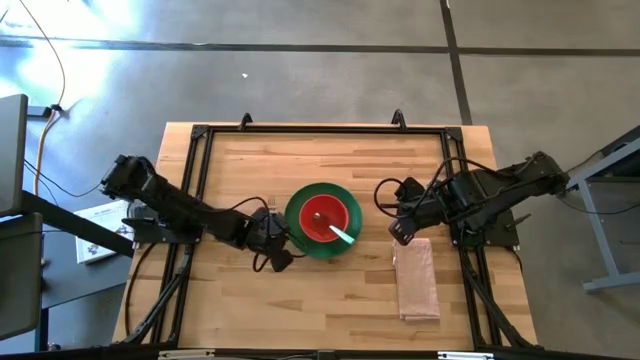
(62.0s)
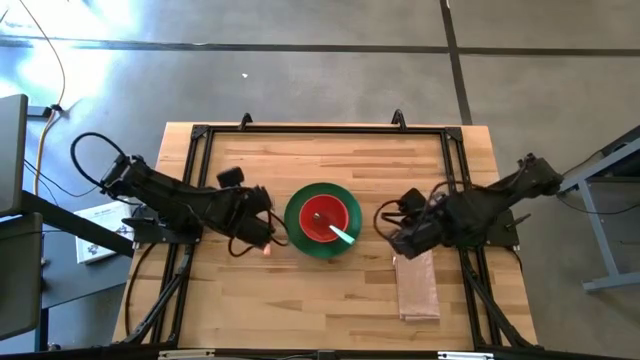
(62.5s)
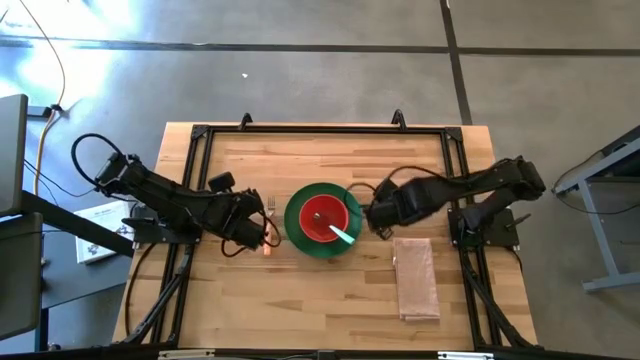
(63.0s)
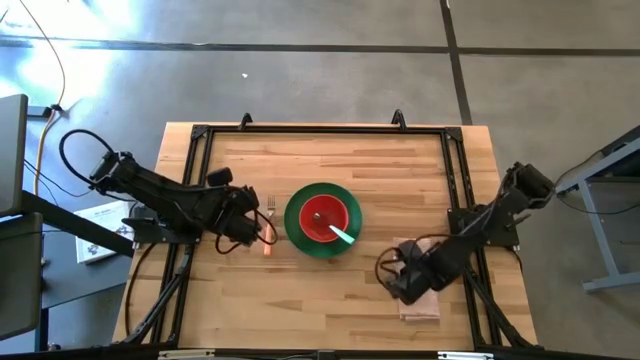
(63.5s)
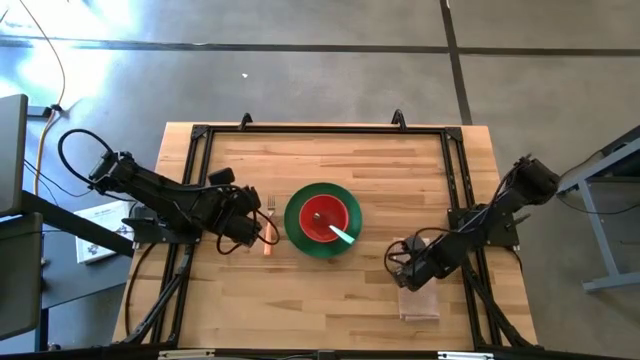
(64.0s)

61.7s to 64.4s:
Task: Set table place
Adjust the light orange table napkin

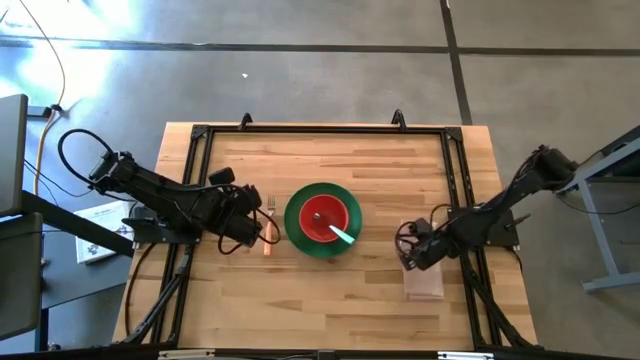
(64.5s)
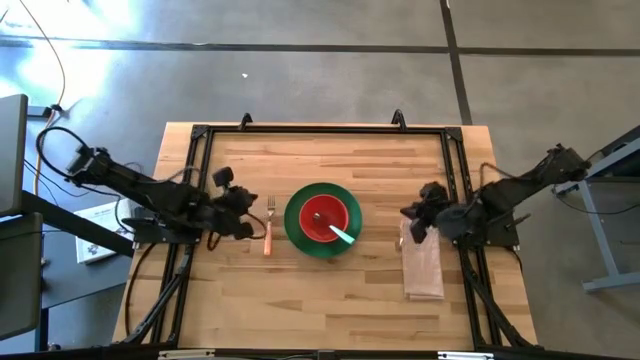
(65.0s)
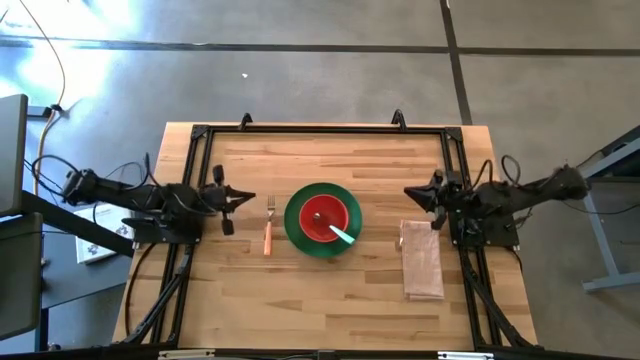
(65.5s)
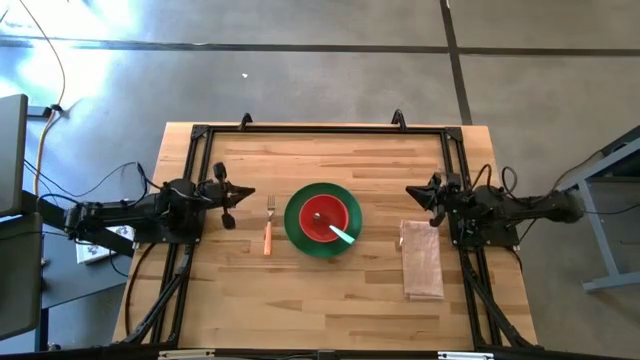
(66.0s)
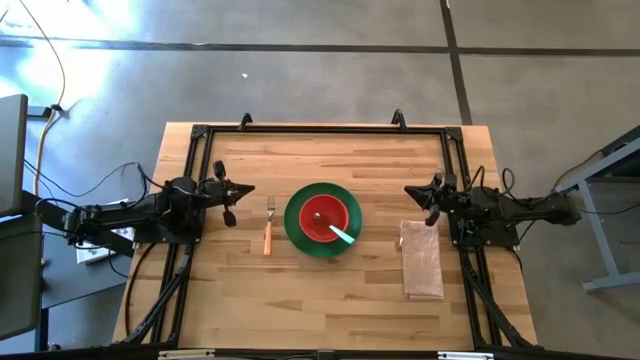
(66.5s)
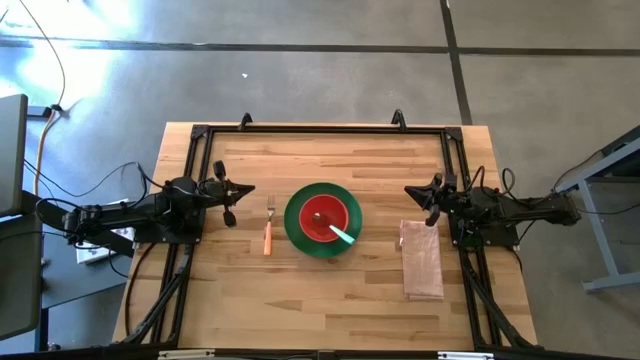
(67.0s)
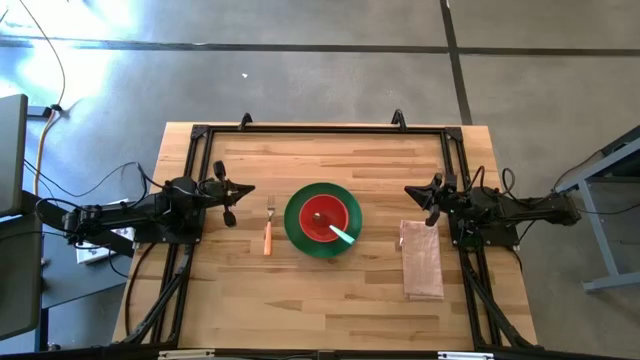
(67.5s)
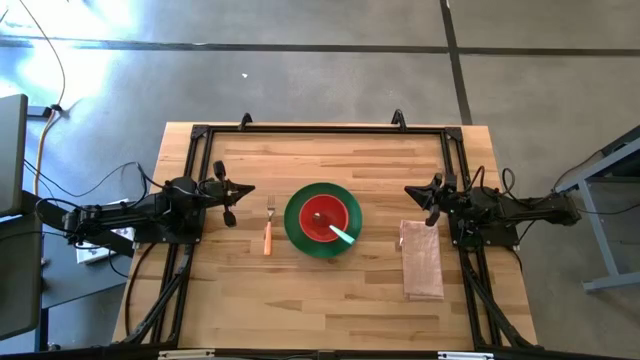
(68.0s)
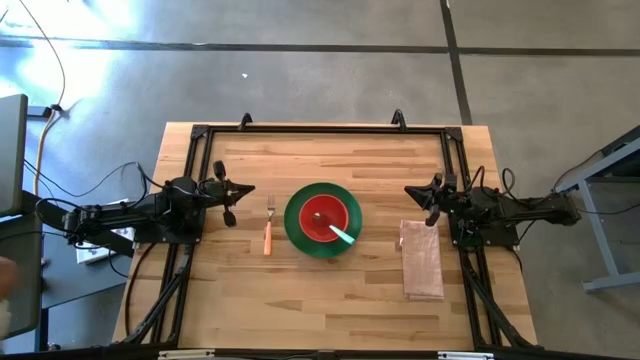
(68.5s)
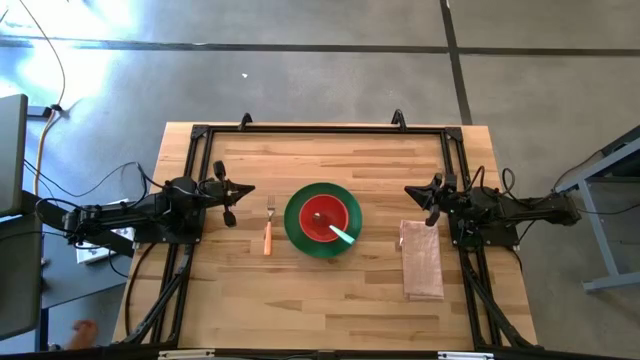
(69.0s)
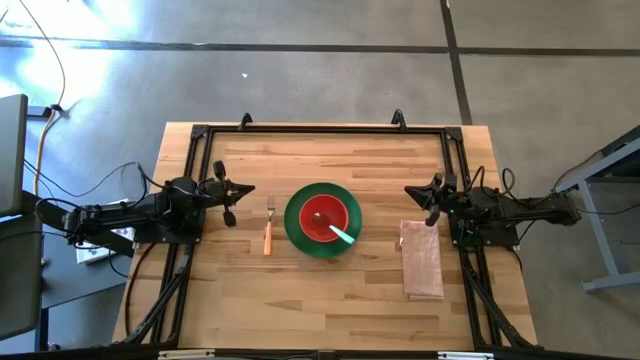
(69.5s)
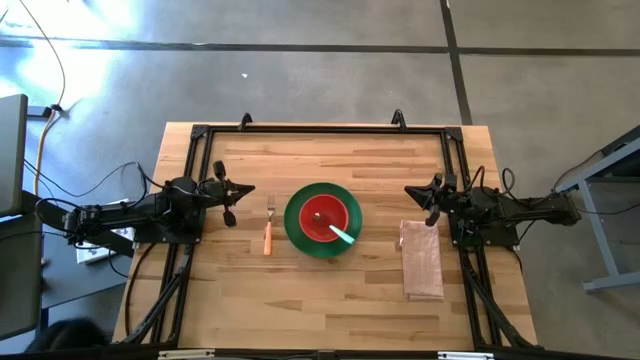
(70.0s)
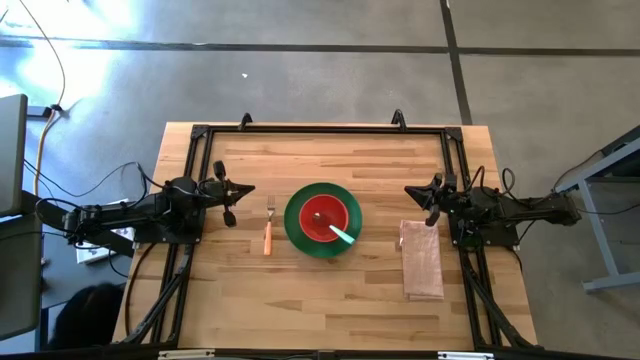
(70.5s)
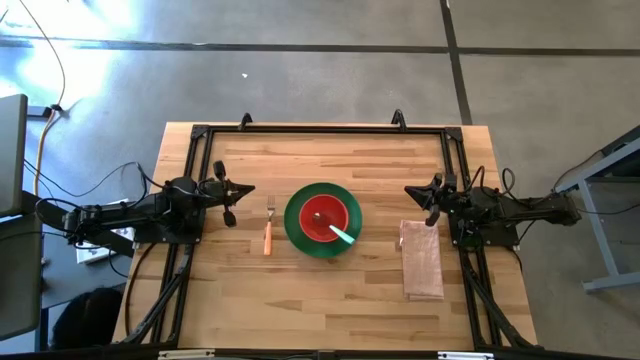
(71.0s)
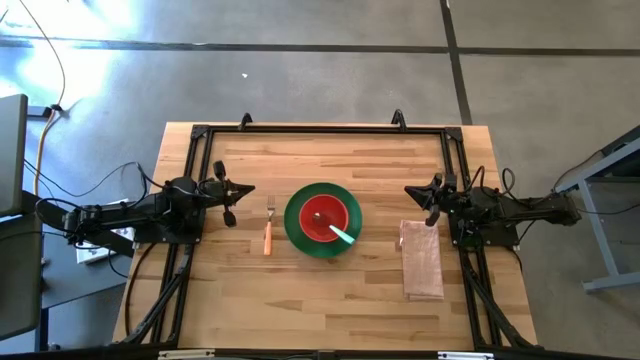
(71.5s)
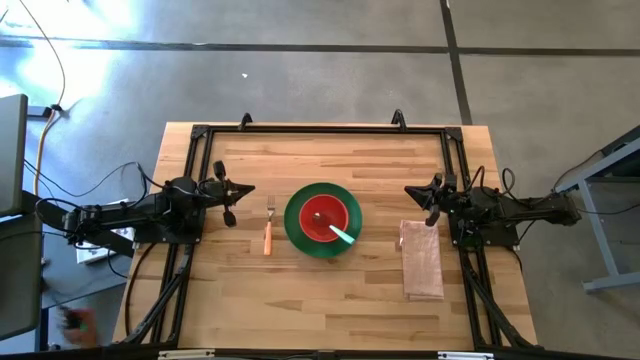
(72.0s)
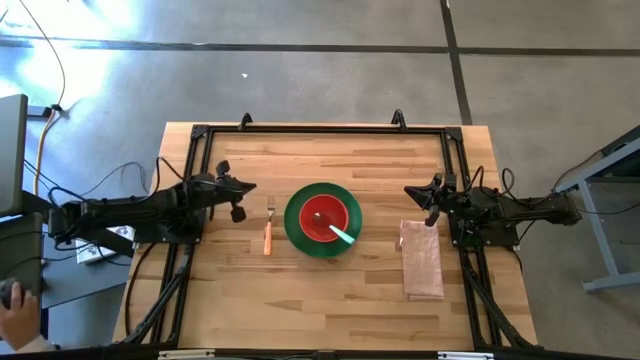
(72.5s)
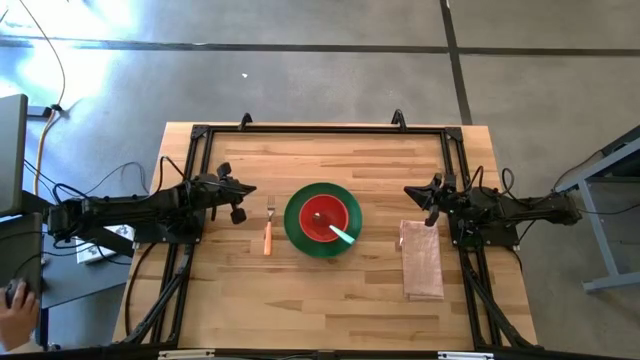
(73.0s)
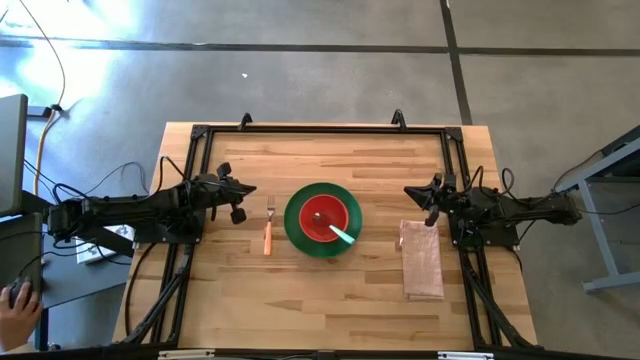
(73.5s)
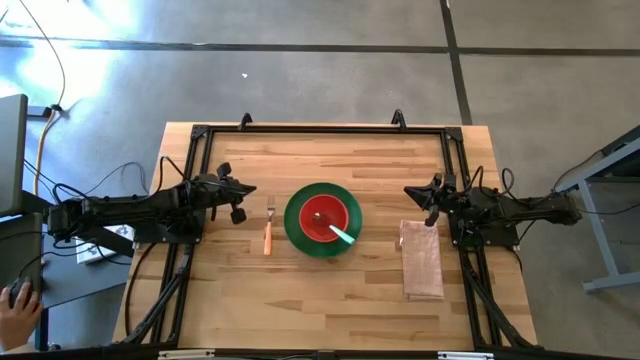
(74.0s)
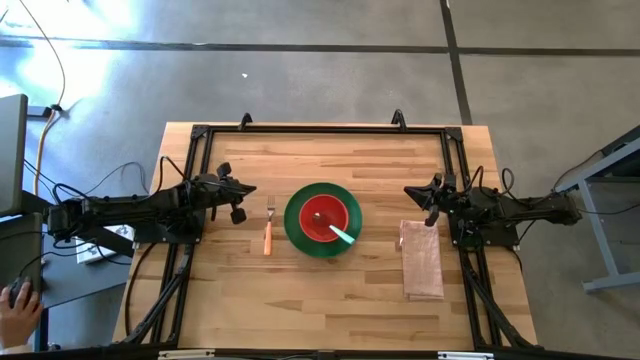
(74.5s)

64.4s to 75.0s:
Return to Home position

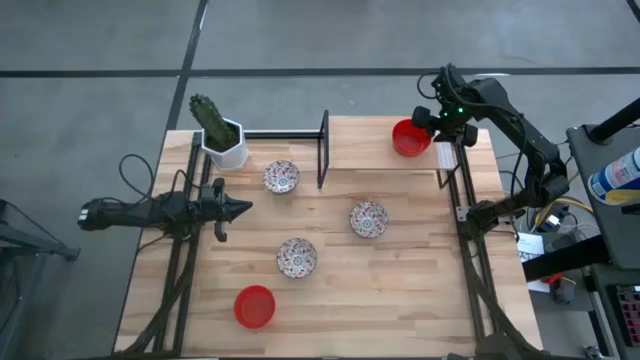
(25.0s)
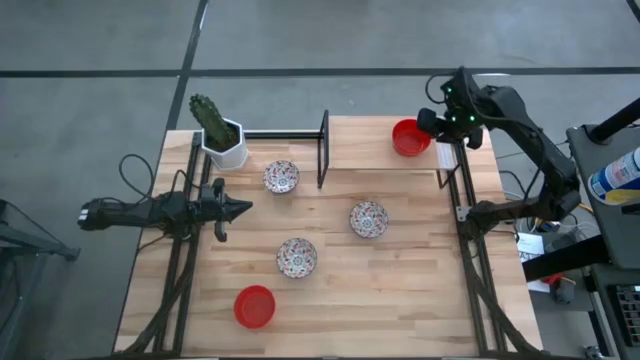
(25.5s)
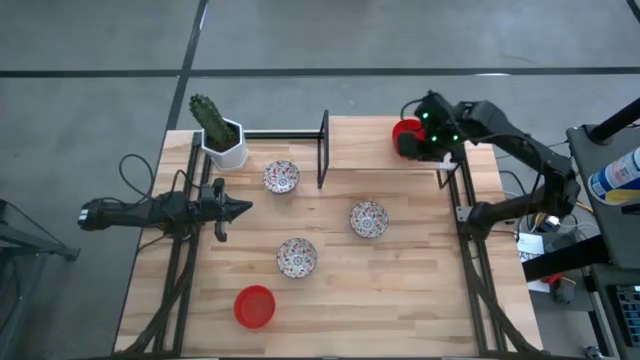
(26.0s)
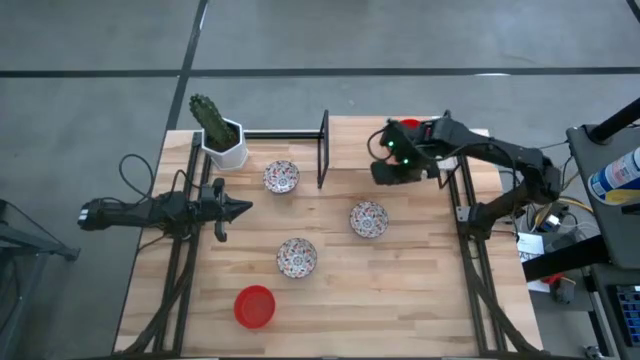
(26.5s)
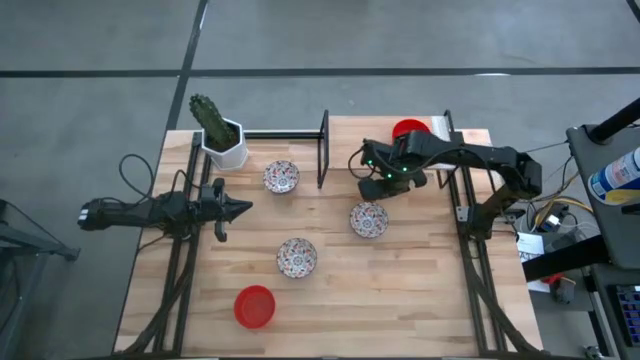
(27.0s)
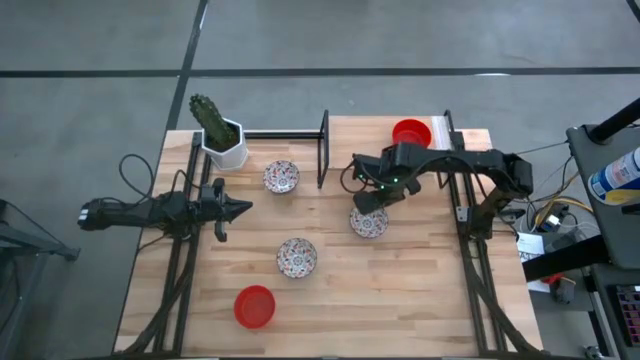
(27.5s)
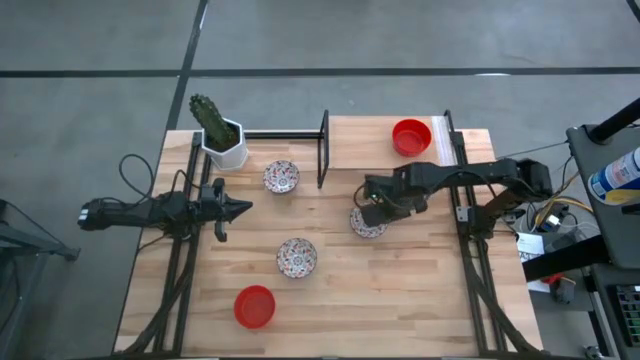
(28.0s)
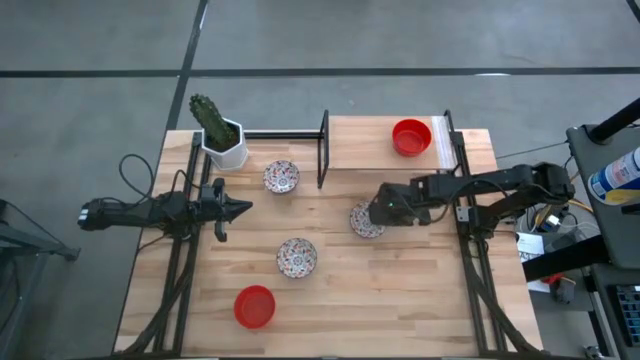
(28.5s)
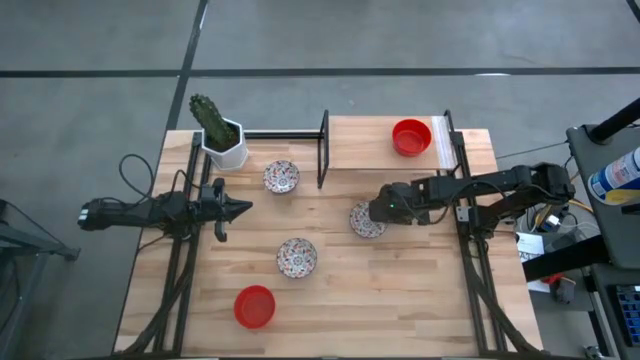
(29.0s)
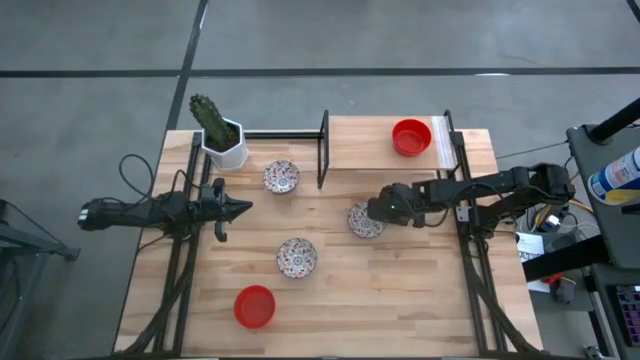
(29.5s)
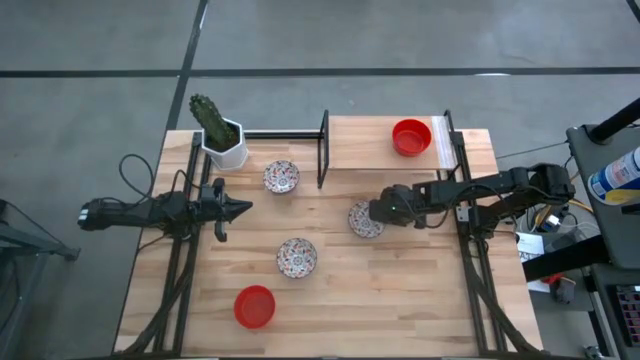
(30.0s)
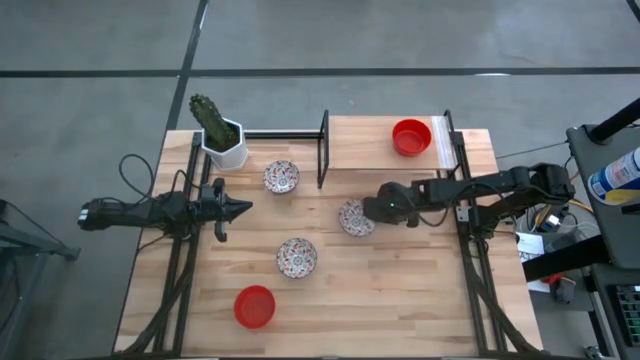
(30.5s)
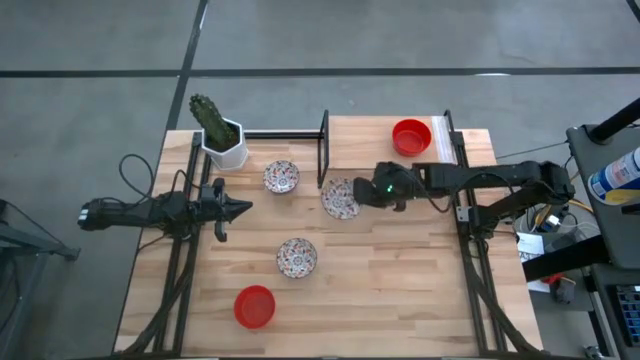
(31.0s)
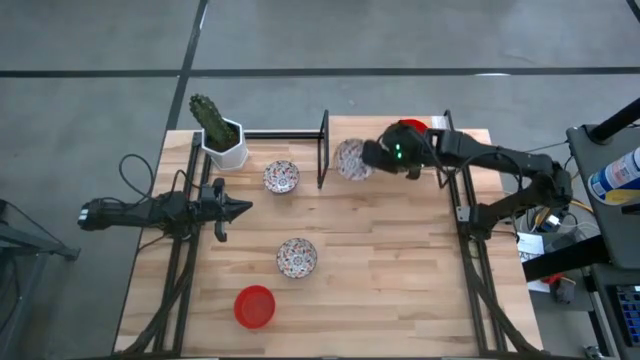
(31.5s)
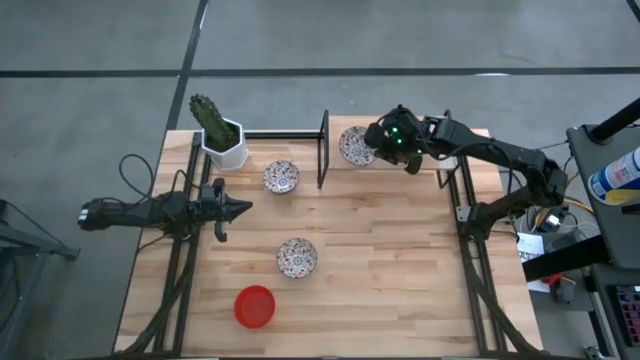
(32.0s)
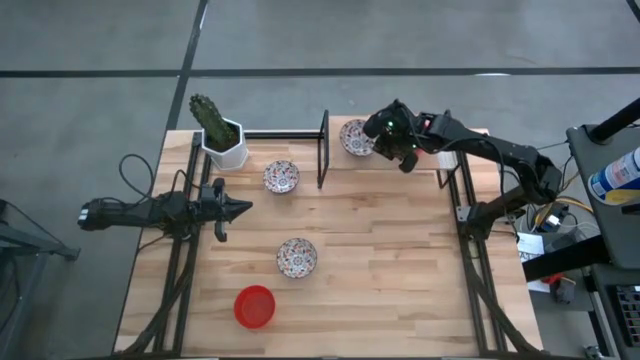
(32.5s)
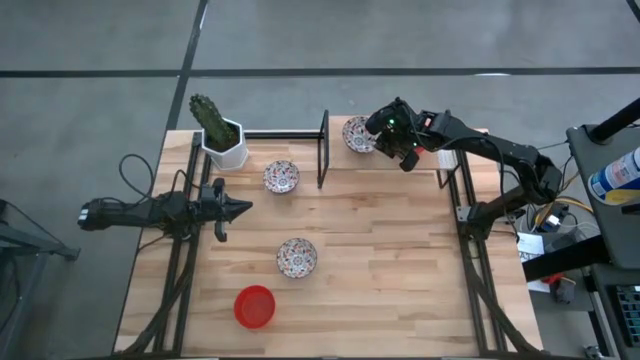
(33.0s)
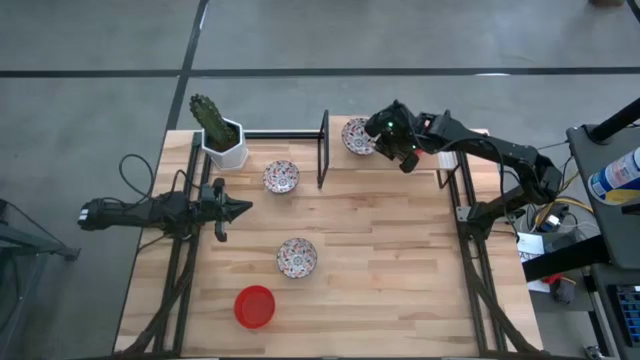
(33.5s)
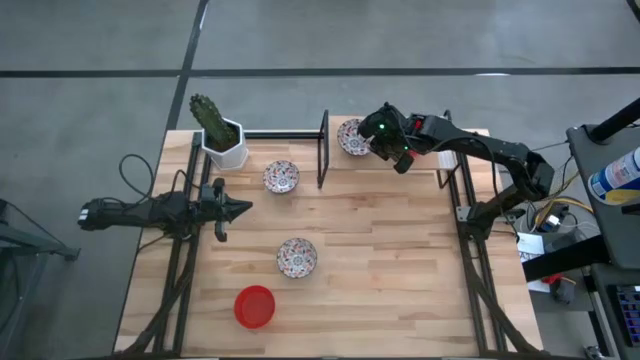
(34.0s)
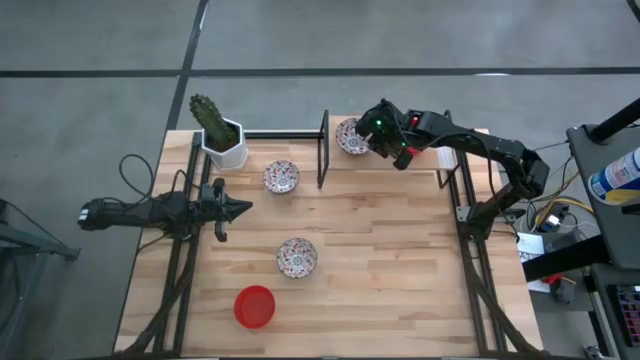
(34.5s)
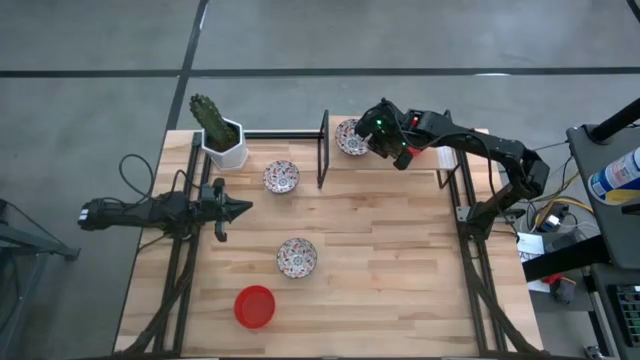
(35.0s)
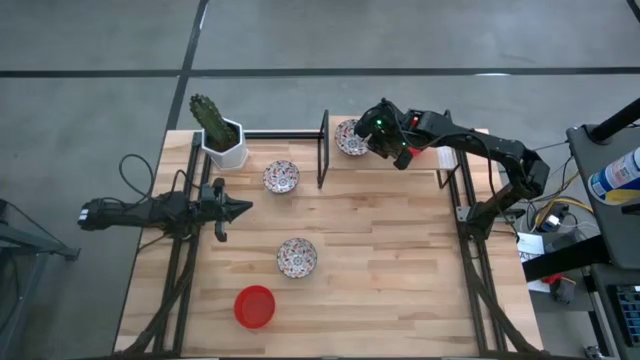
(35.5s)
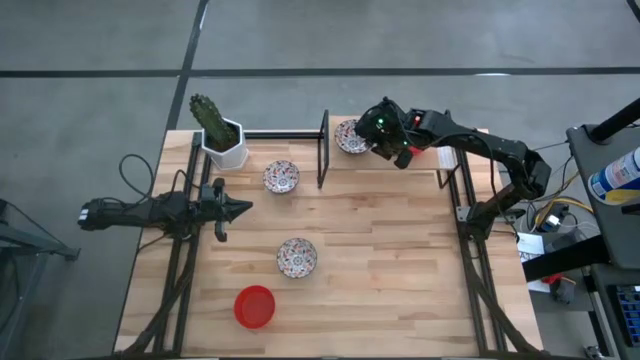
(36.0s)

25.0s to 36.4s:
Task: Pick & Place Mini bowls
Put the white patterned bowl on the shelf
